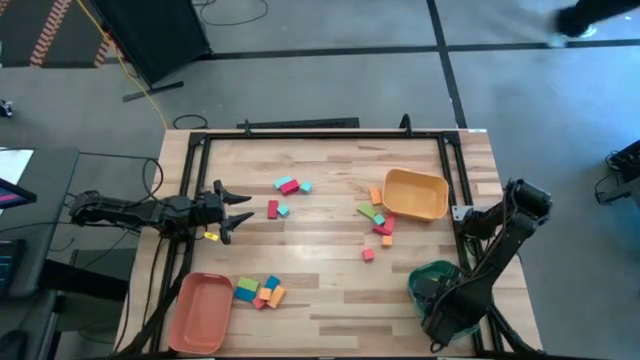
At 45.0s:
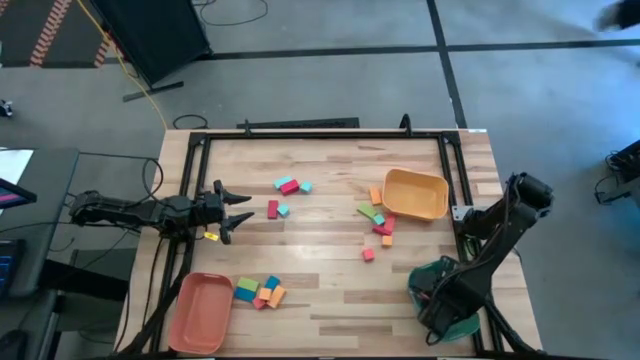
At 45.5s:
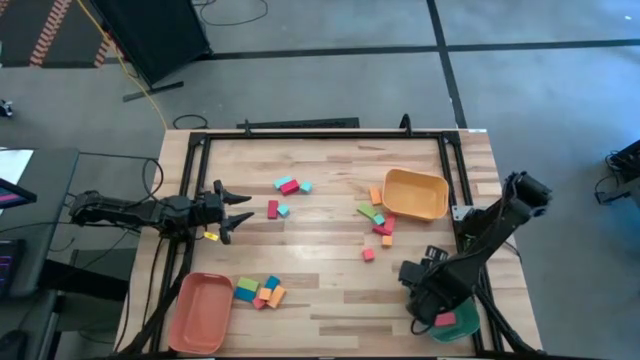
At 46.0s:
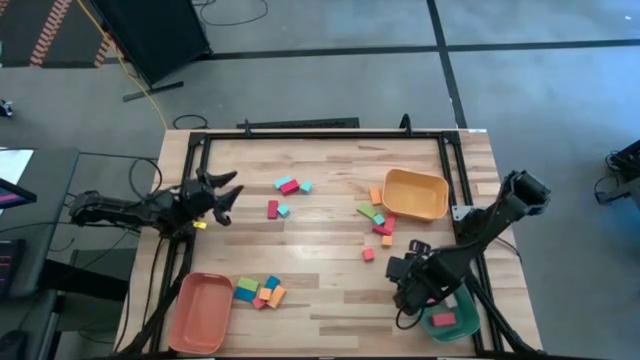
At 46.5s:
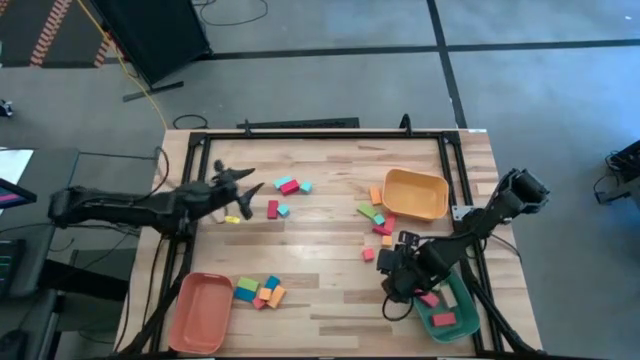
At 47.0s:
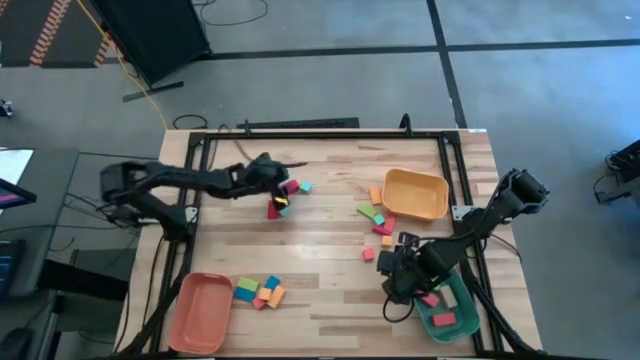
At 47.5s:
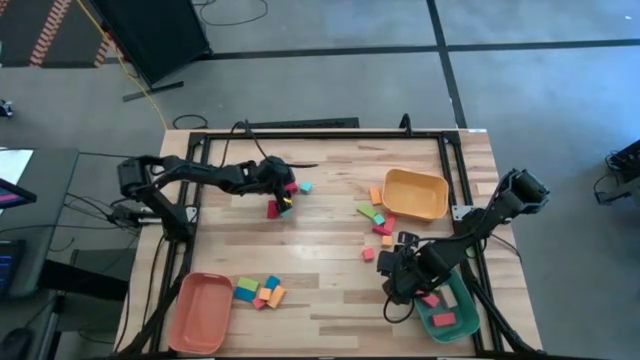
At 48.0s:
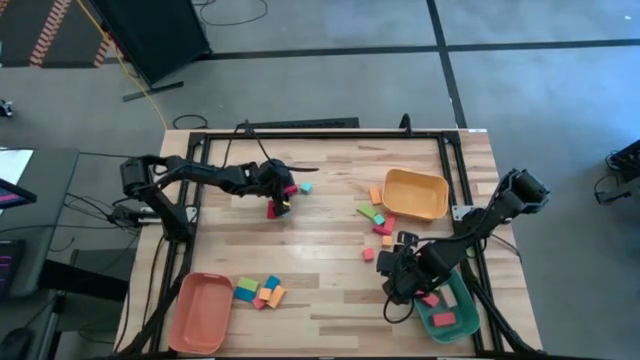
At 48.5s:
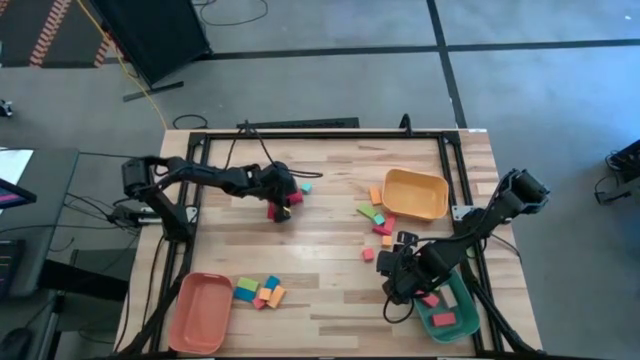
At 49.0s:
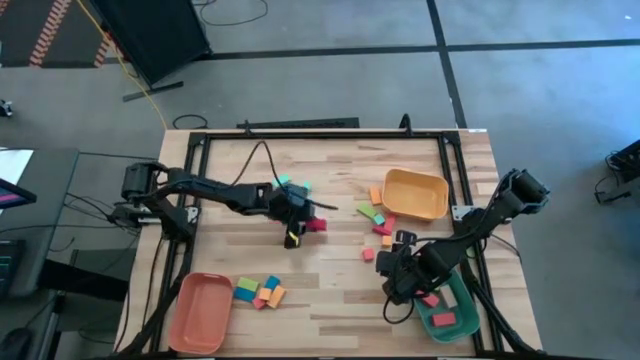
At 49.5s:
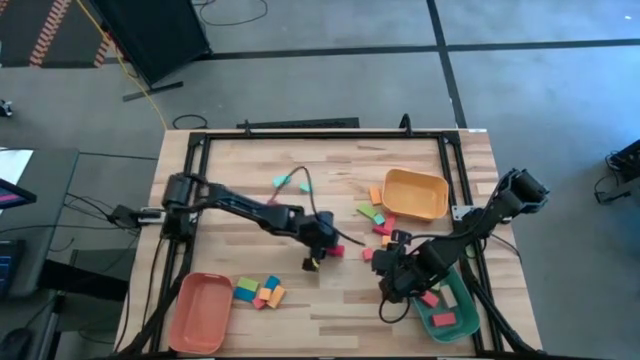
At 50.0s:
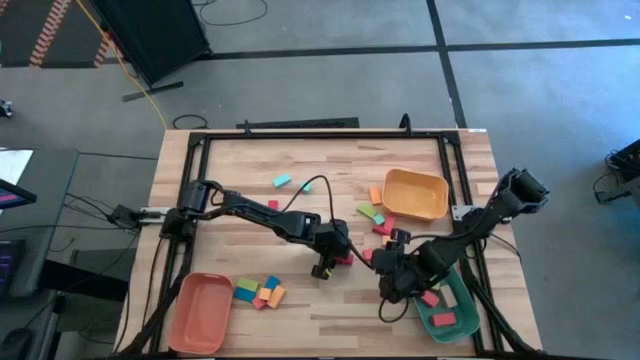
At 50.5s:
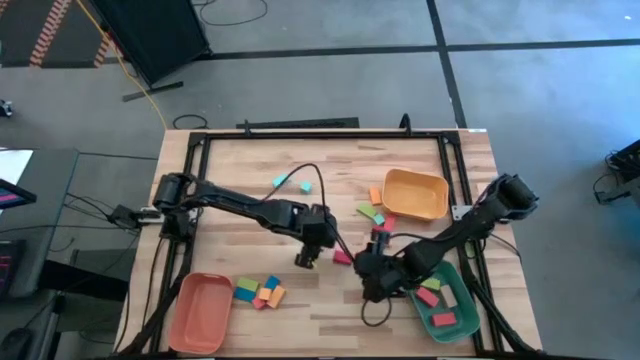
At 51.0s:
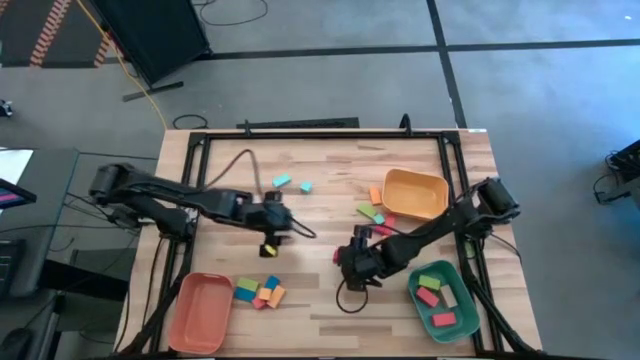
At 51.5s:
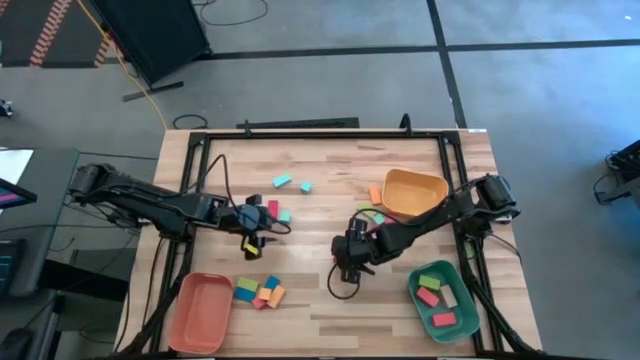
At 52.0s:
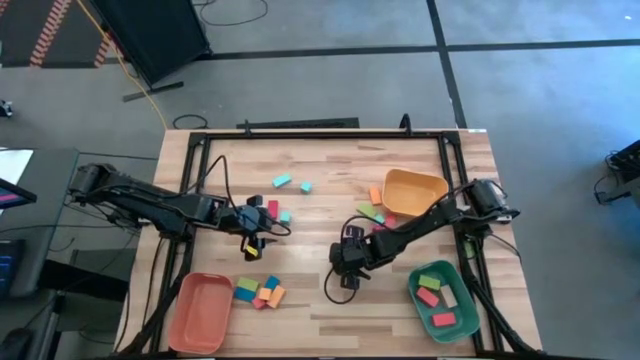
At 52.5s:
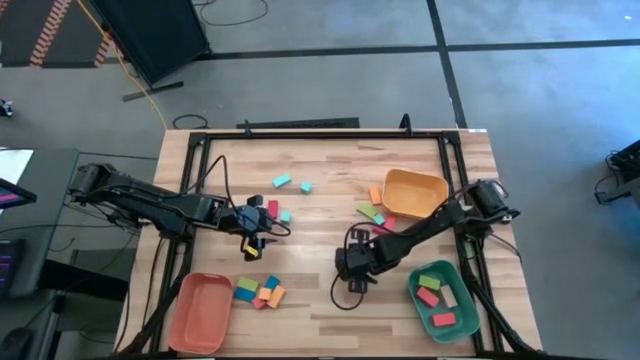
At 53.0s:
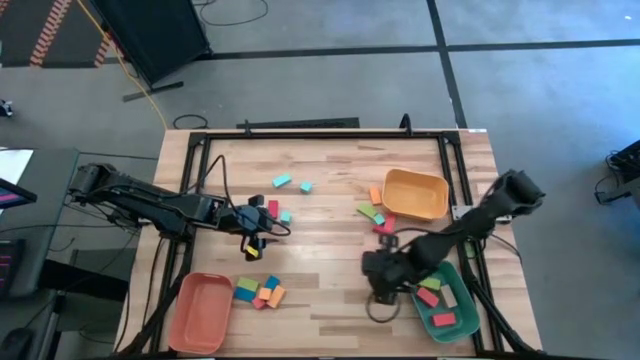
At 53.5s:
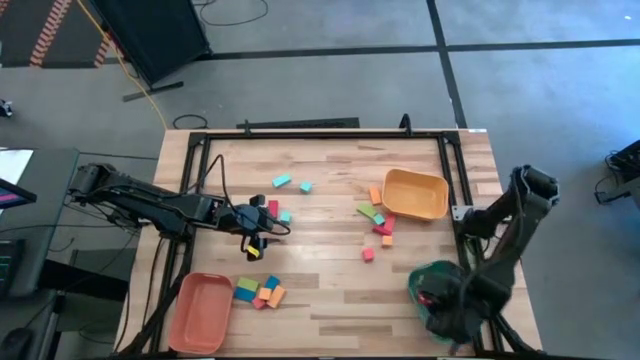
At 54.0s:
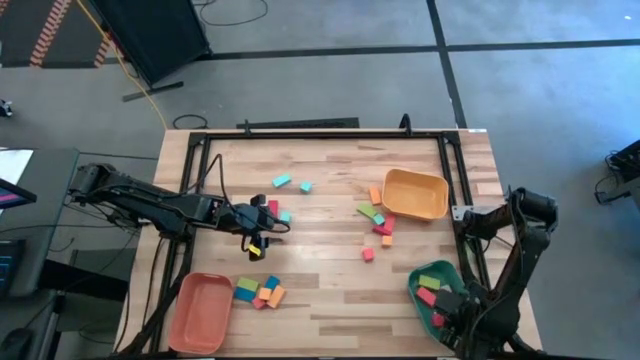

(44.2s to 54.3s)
Task: Sort blocks by size
Put the large red block into the green bin

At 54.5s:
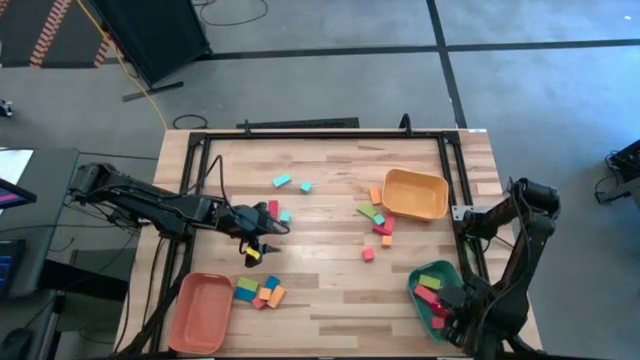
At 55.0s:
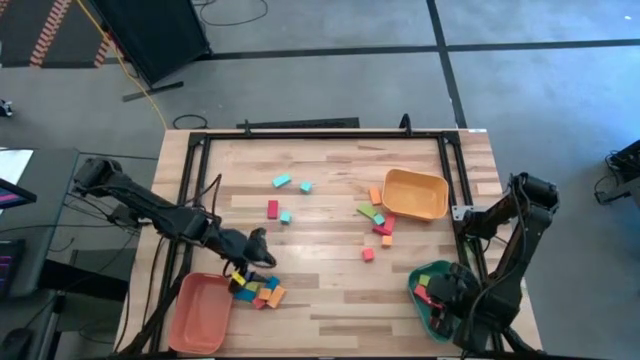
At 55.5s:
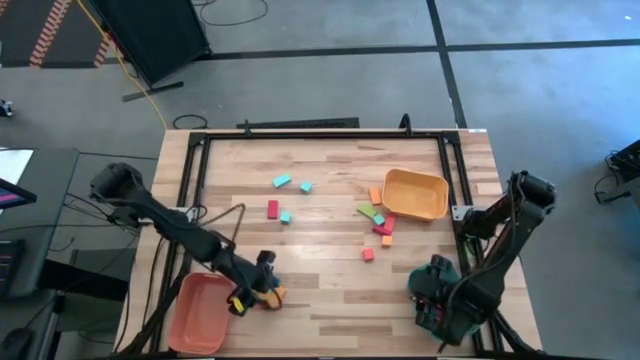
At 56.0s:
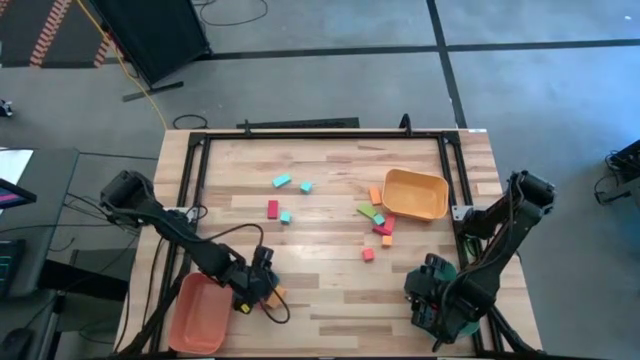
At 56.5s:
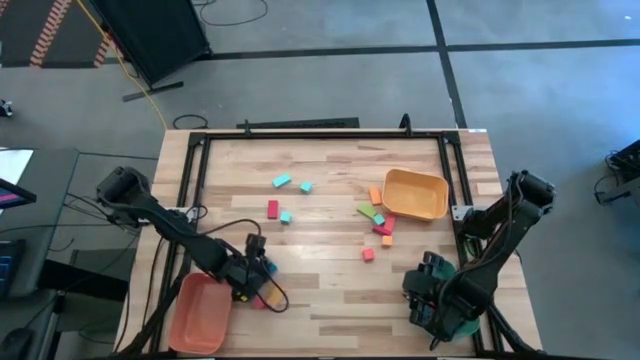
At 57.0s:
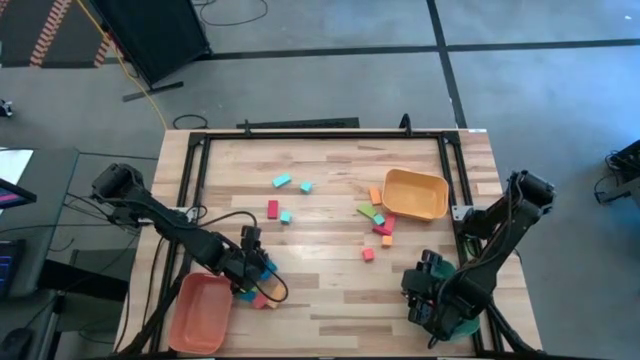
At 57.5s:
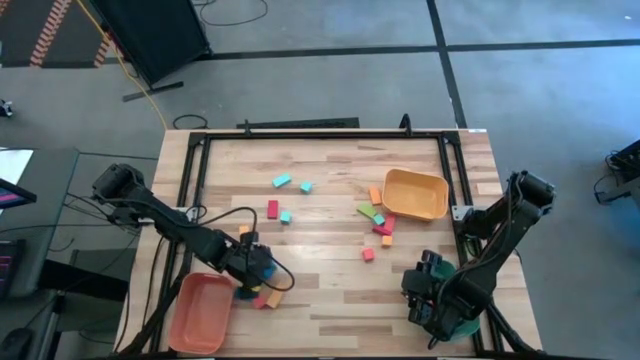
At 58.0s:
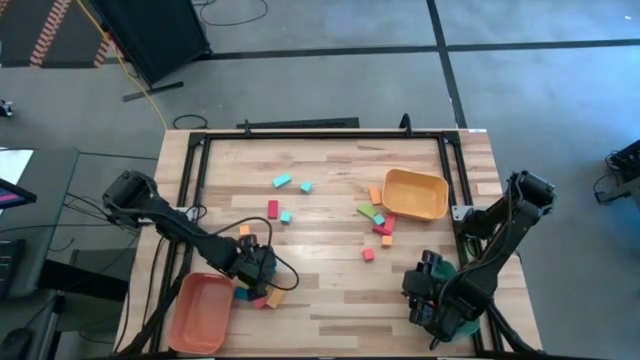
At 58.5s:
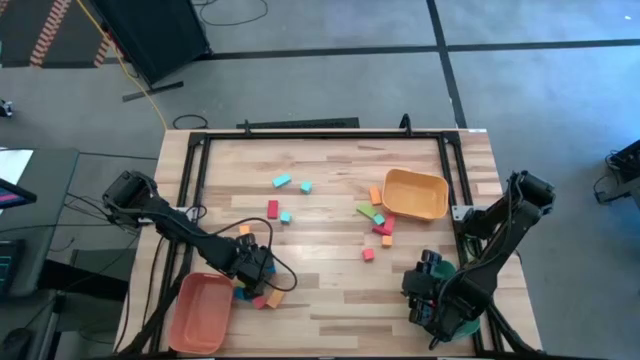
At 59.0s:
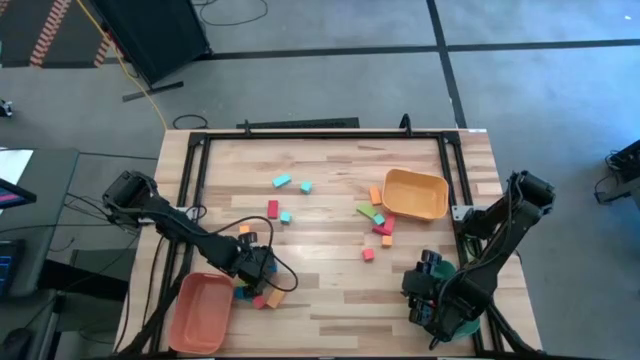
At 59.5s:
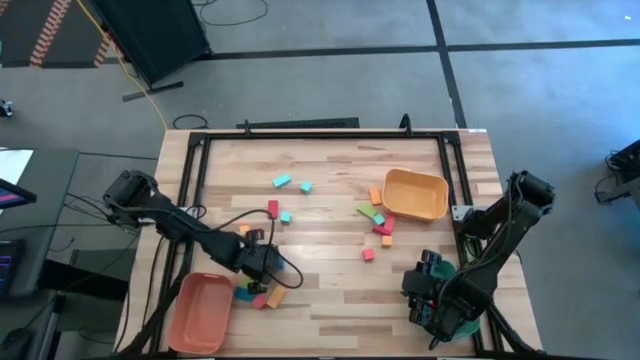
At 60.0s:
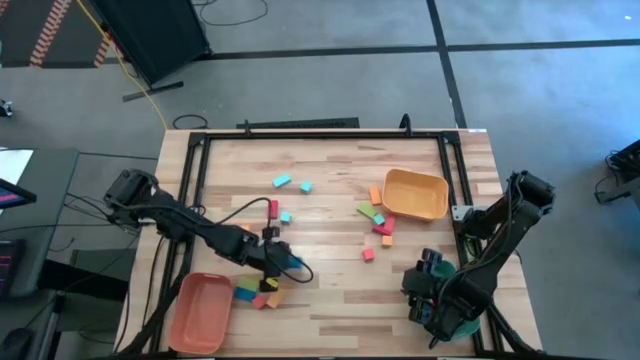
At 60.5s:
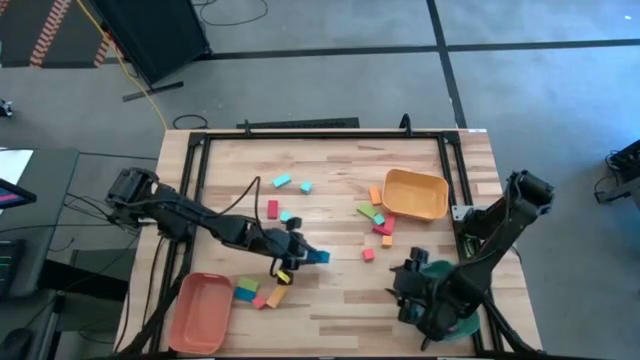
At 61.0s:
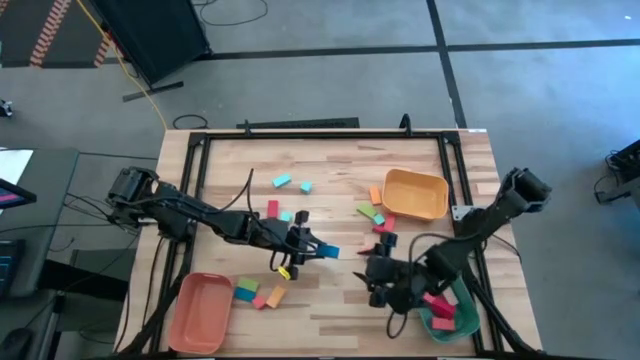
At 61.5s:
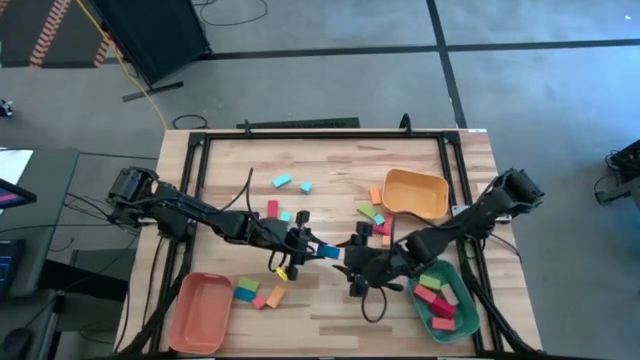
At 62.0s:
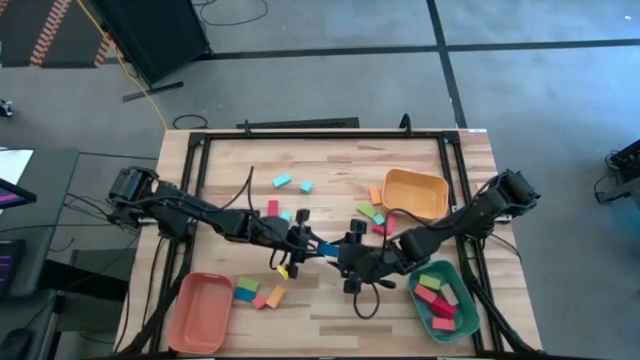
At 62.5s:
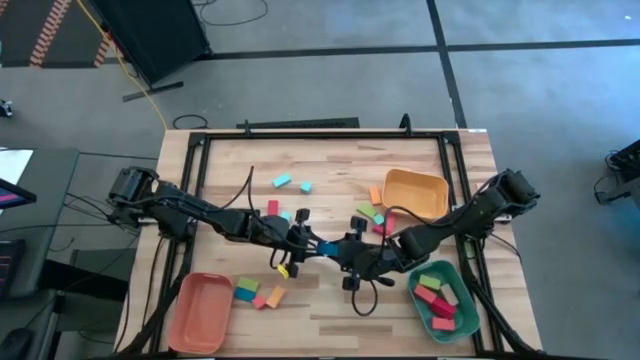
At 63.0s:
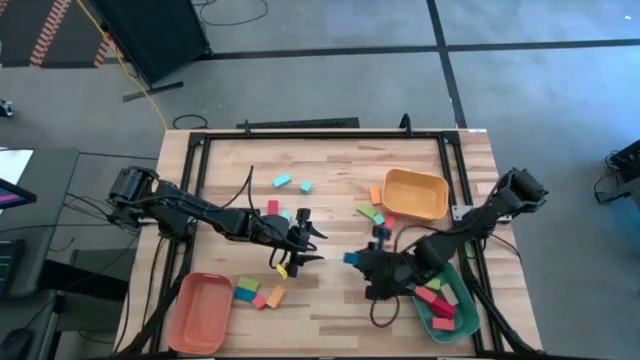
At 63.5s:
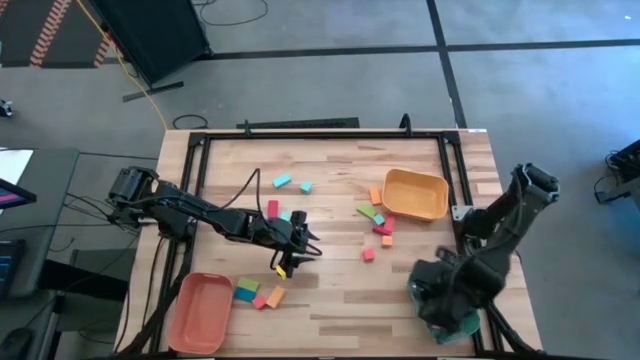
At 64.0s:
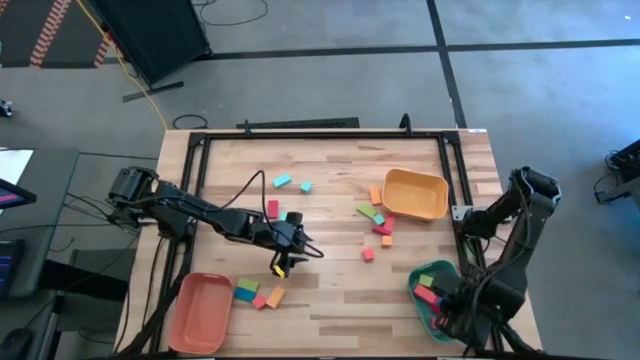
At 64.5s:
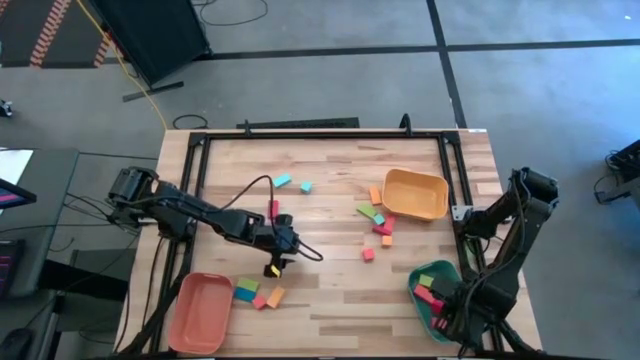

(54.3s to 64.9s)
Put the large blue block into the green bin
